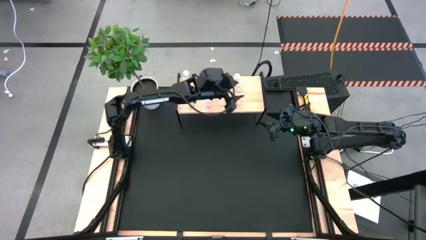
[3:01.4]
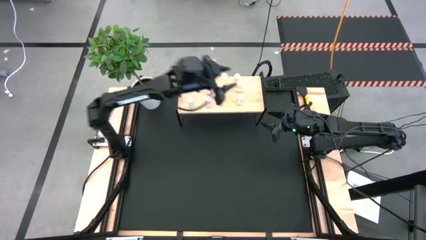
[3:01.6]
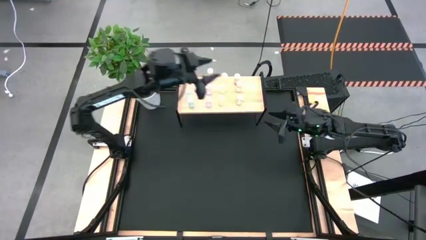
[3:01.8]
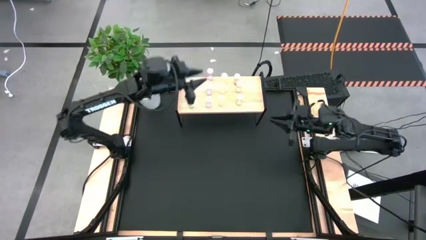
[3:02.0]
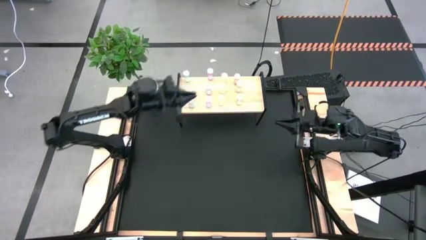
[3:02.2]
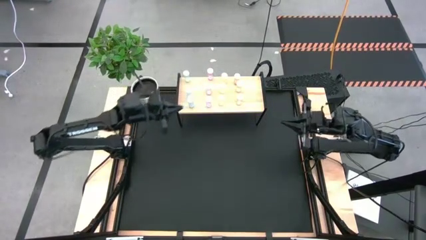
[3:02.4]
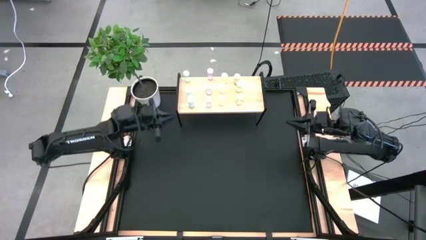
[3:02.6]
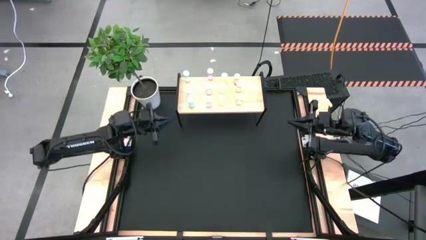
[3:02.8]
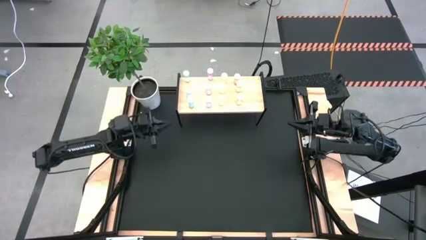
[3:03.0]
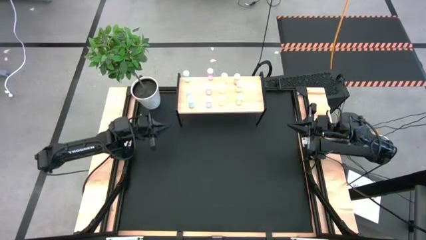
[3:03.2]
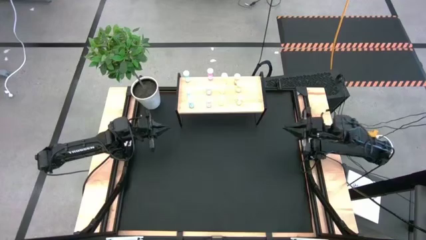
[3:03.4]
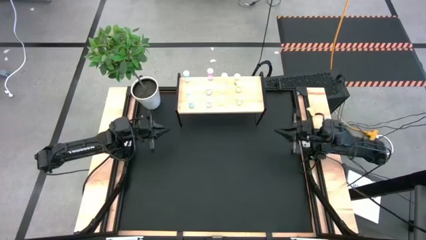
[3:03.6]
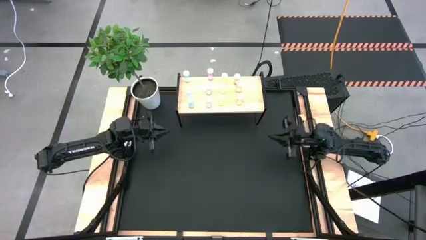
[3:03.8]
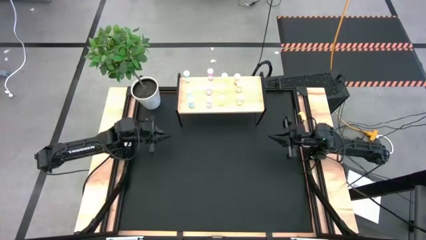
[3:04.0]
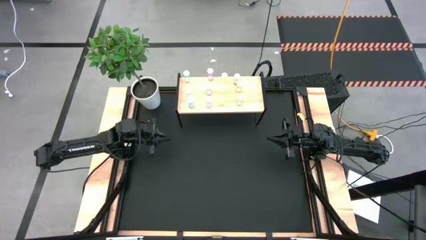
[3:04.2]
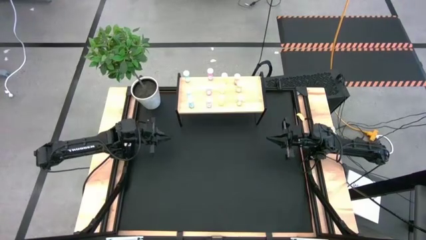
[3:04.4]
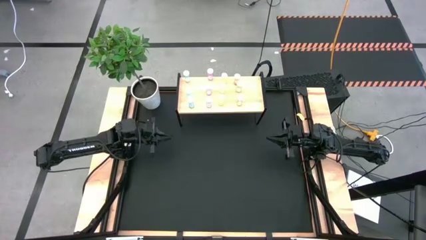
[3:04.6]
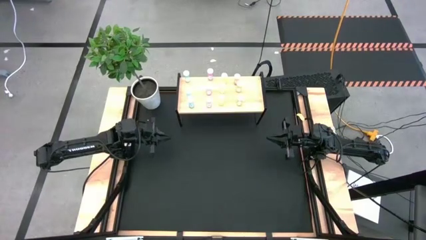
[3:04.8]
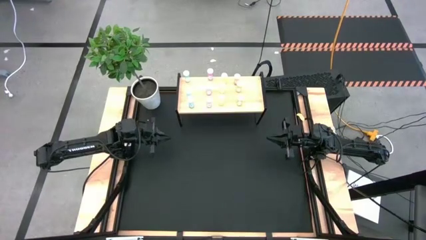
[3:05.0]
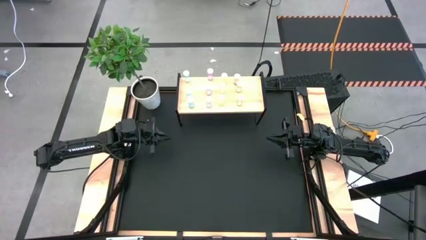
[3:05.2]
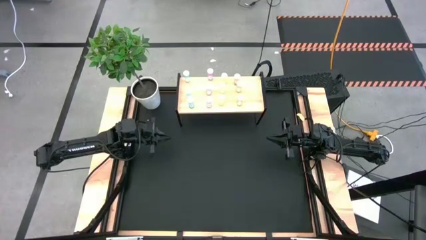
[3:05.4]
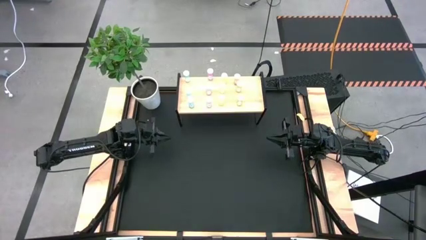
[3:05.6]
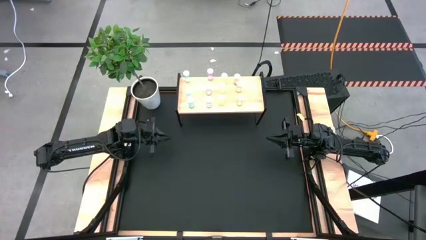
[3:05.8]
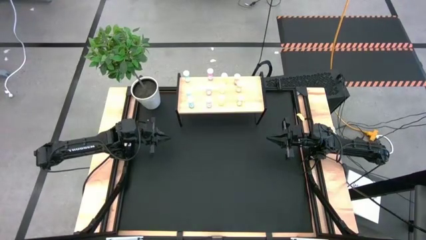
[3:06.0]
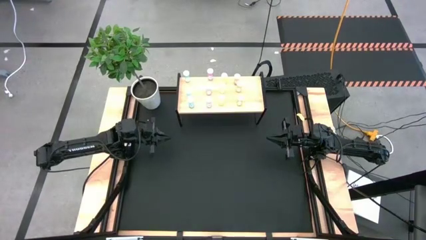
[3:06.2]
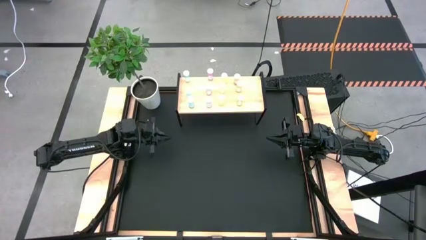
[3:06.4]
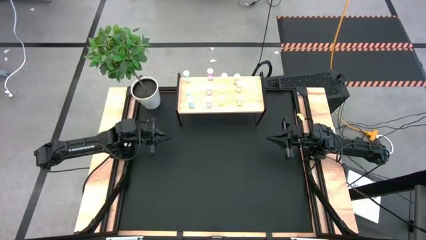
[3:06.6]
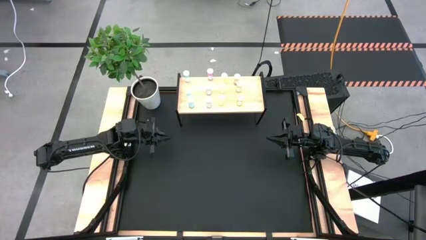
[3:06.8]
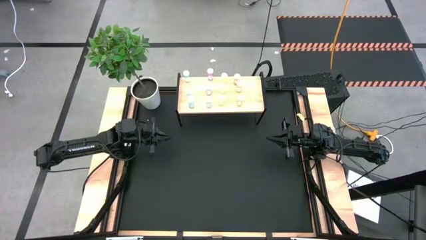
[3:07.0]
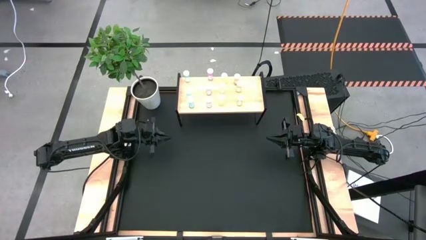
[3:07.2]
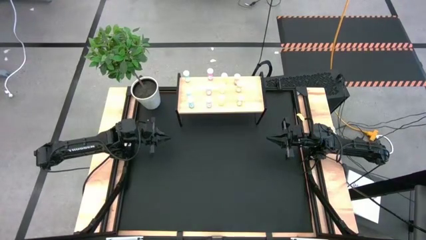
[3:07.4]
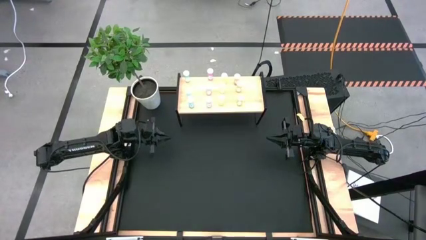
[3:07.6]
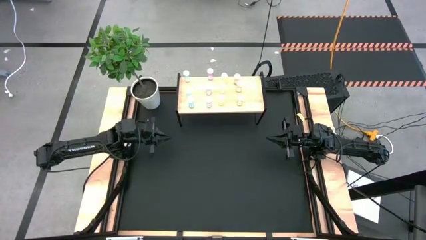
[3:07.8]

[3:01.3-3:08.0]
Task: Pick and place medicine bottles onto shelf by color
Return to Home Position

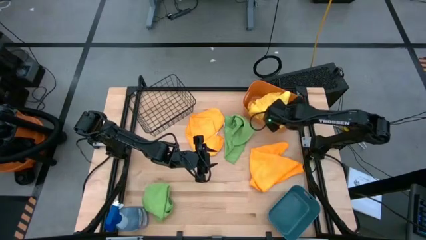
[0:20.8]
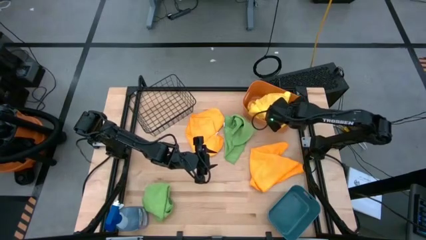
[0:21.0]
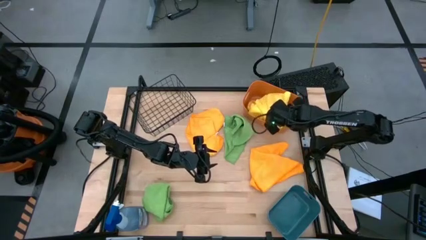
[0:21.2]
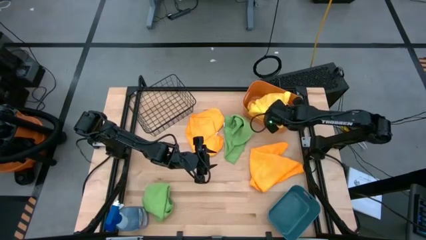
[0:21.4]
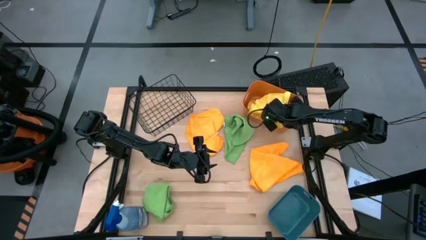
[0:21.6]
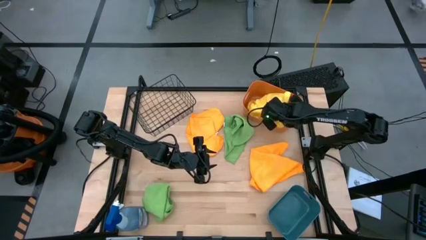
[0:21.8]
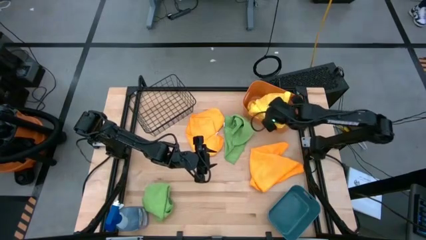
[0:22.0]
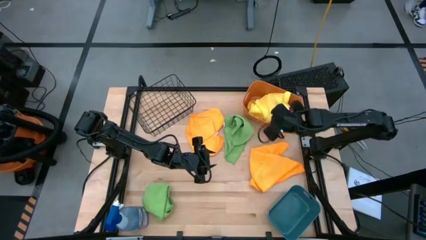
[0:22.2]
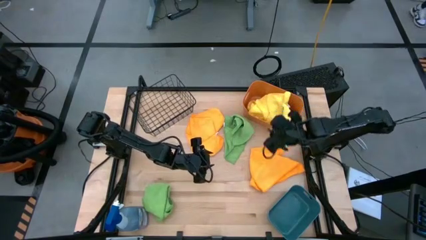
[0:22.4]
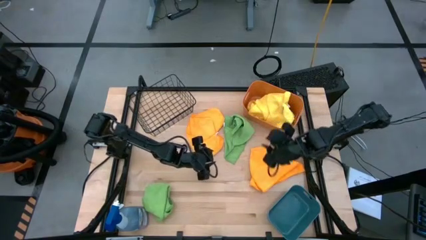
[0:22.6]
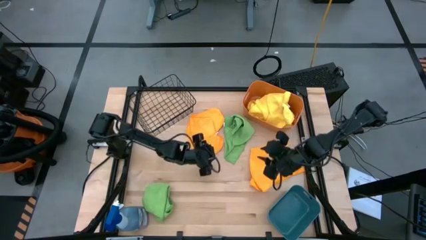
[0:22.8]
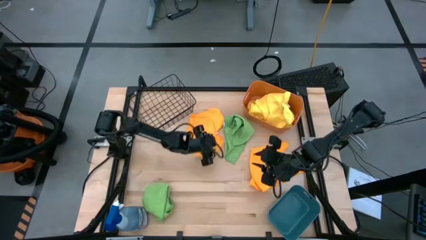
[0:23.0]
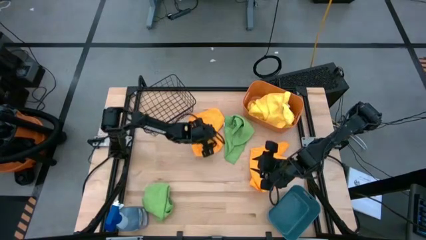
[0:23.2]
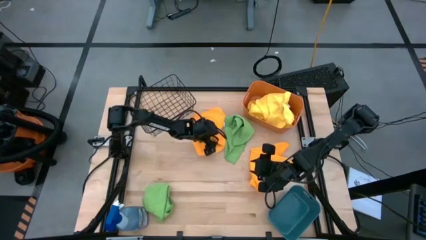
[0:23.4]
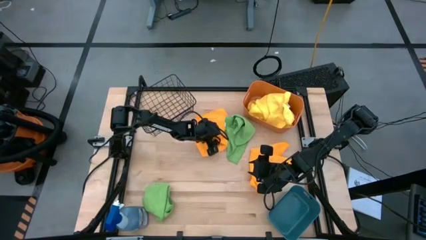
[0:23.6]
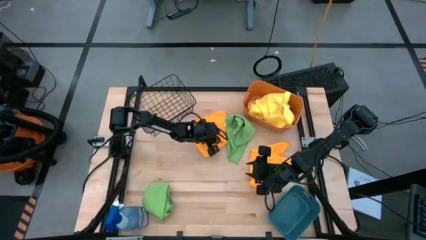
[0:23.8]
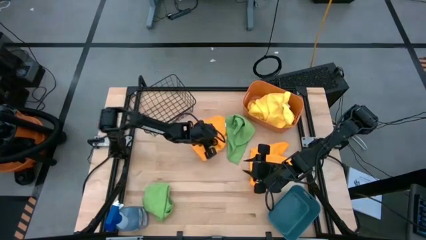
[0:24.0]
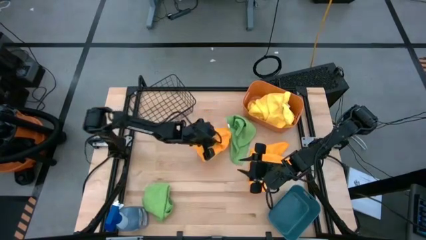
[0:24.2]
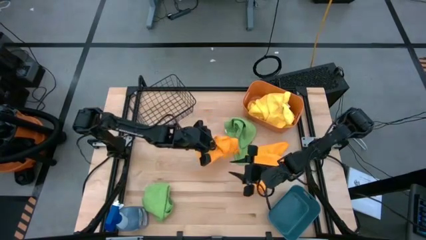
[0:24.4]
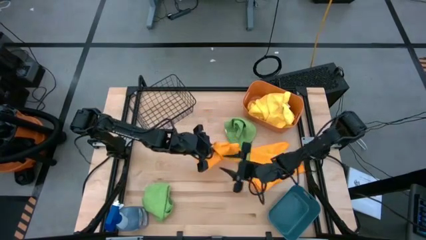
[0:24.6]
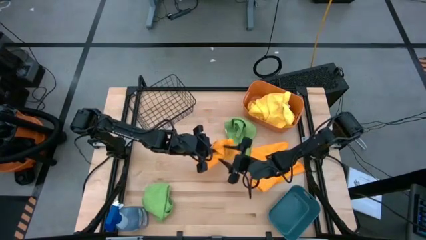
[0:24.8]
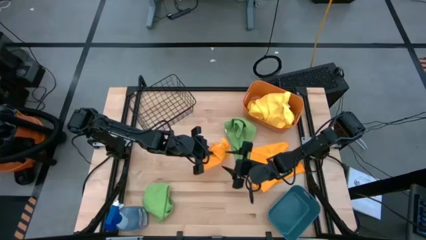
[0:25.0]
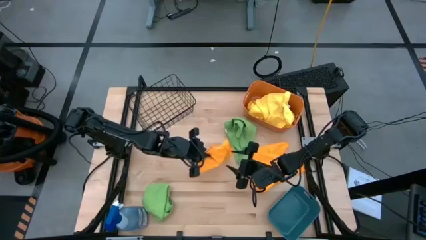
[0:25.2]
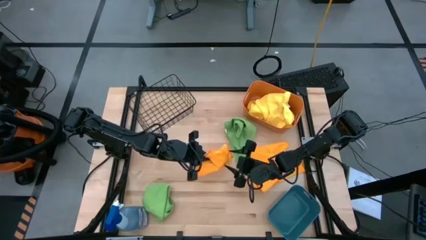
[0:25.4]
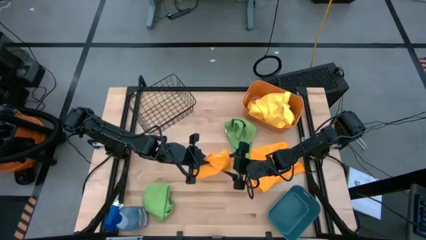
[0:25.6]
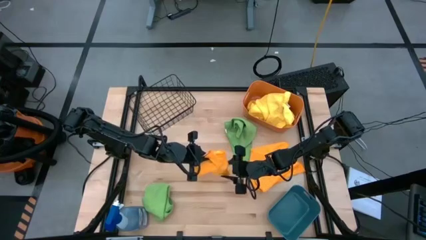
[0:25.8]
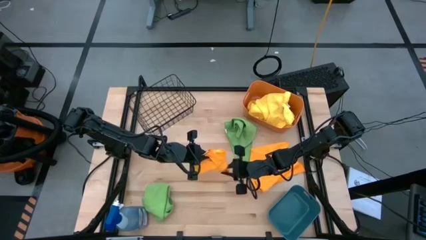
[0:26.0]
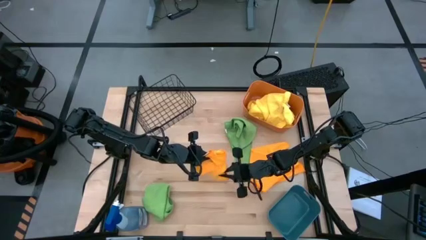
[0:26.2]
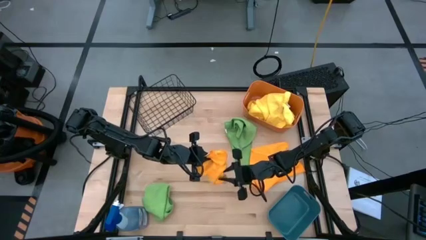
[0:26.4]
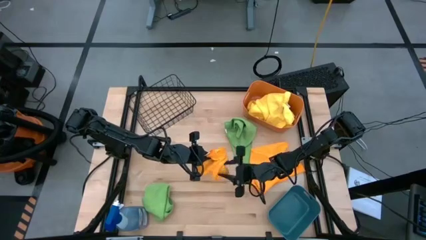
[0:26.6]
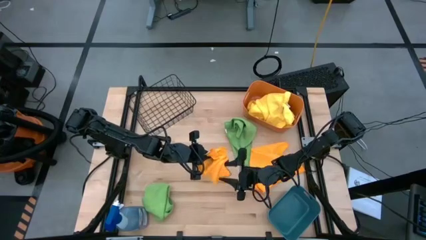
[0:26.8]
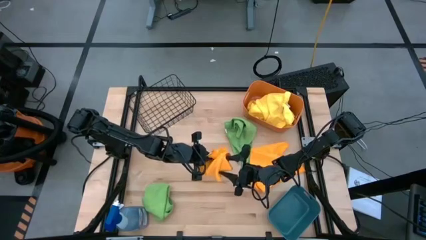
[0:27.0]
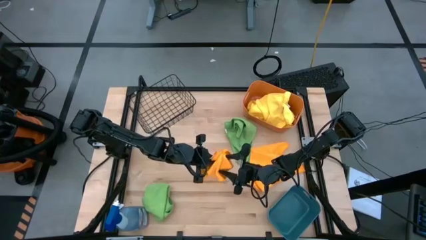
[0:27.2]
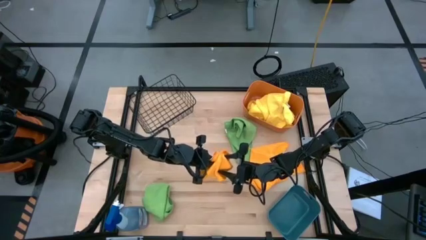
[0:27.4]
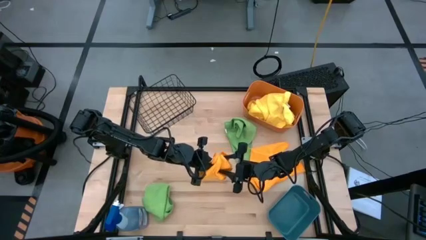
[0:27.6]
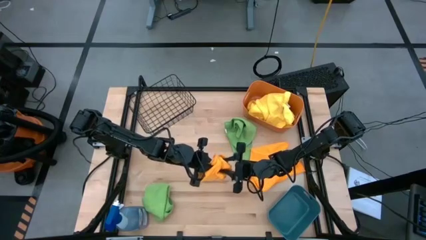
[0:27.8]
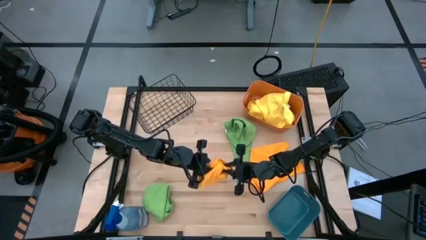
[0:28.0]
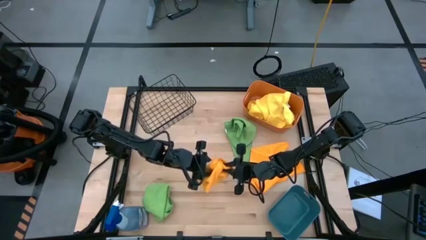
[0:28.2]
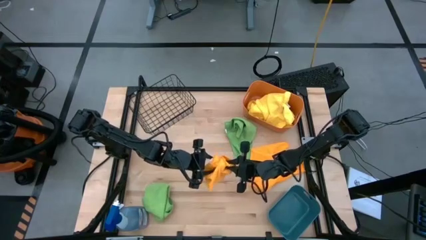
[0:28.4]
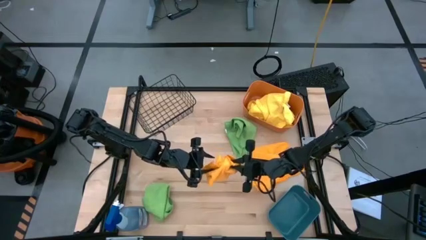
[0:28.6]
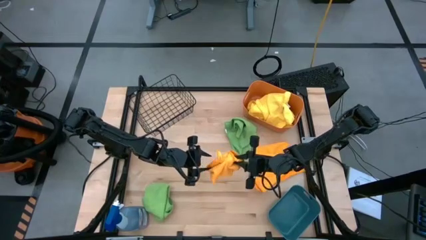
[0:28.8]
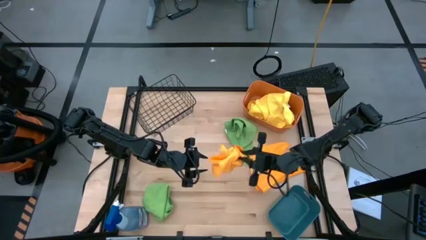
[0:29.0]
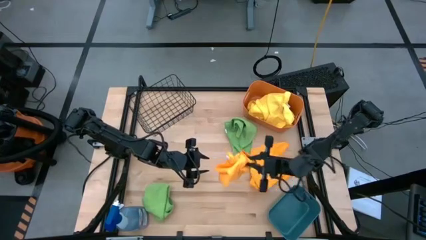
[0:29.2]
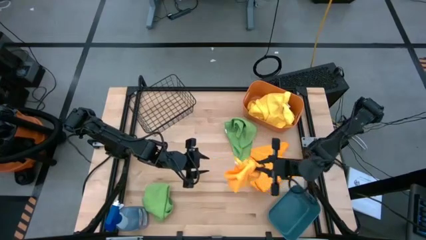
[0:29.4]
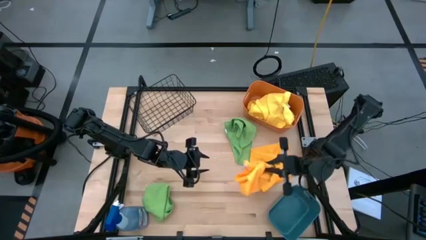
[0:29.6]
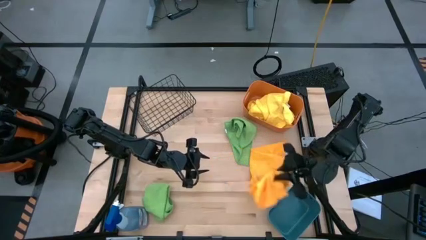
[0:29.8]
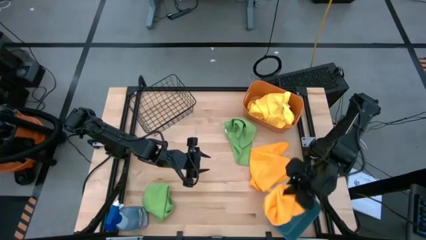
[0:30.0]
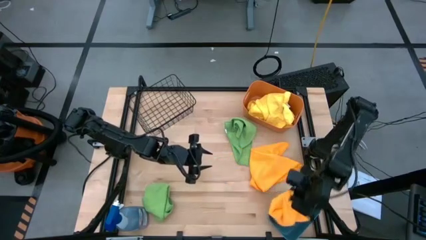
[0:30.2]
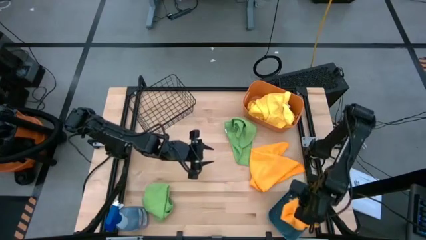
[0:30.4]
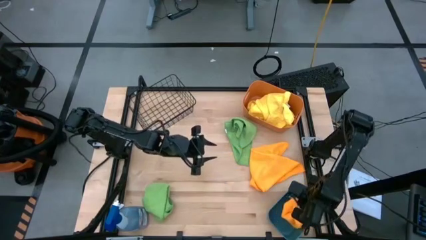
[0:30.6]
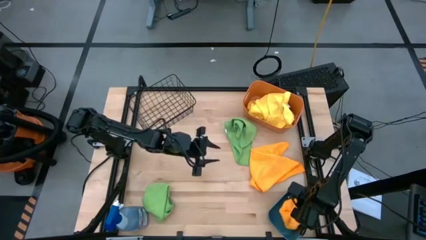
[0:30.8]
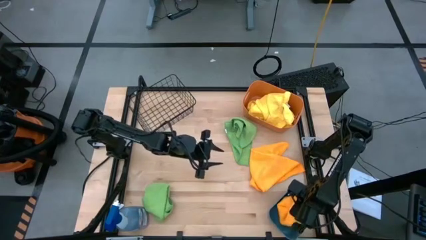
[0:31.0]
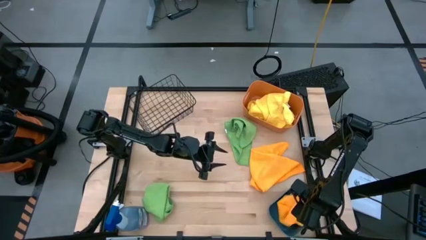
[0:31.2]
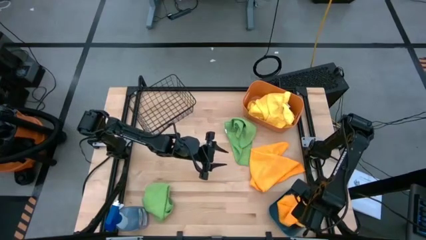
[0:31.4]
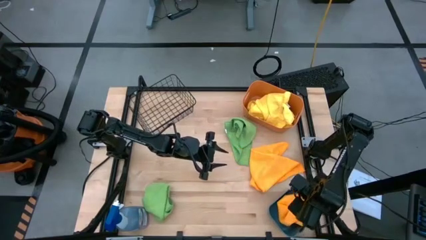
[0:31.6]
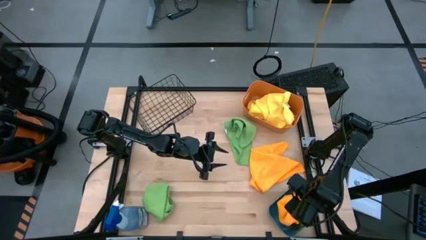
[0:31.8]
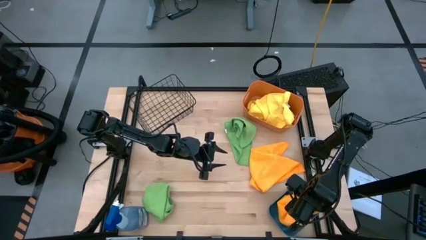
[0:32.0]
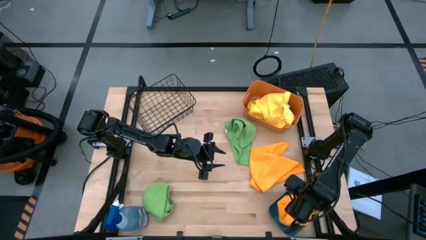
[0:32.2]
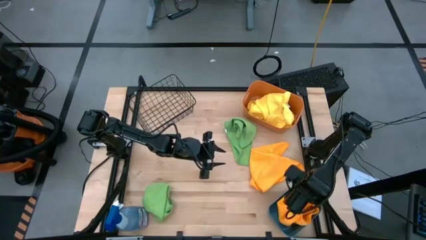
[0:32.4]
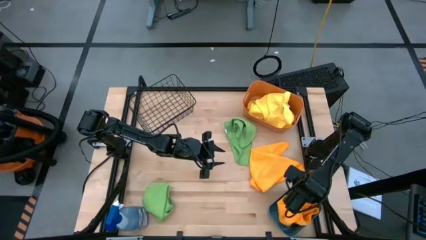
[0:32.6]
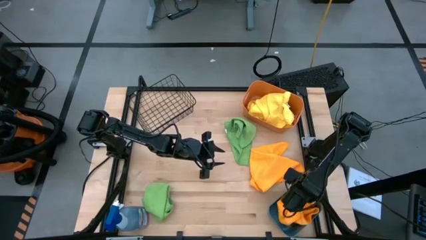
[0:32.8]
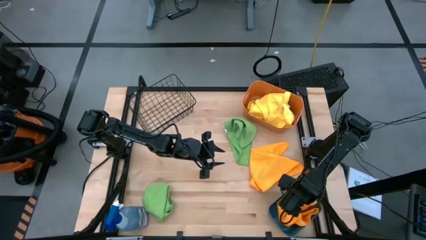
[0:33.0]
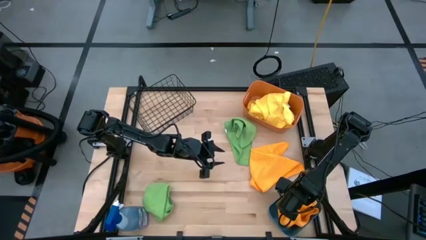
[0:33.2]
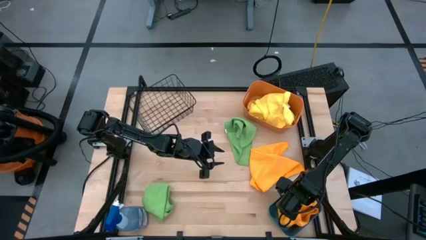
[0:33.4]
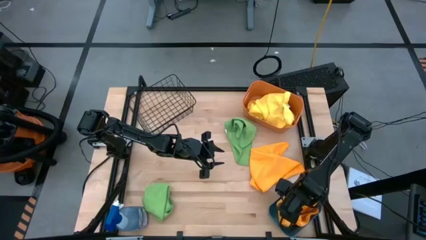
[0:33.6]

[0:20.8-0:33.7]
Task: Sort microfiber towel by color & place in baskets
Put the top orange microfiber cloth into the blue bin
